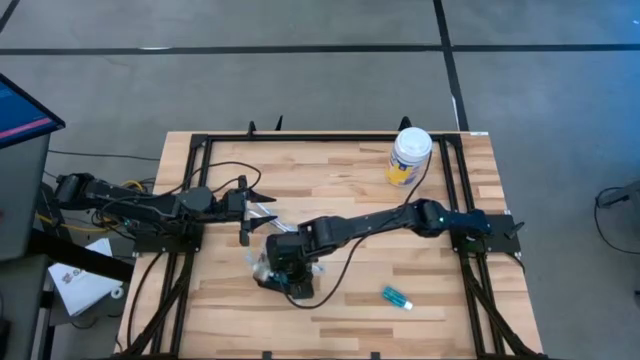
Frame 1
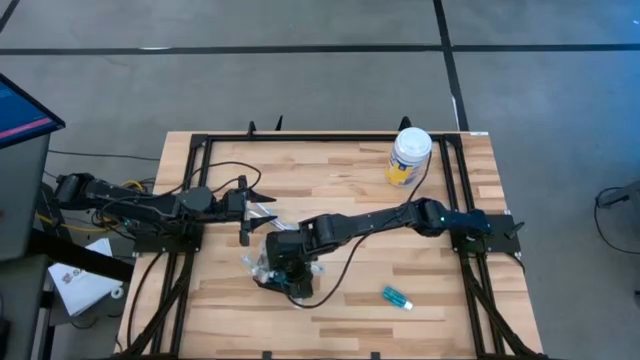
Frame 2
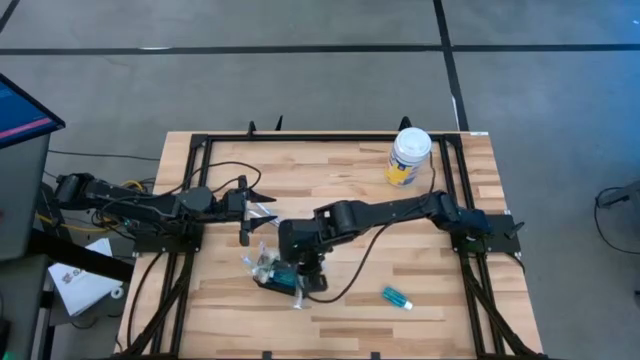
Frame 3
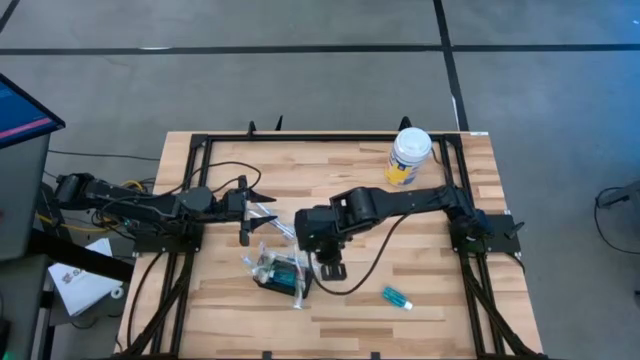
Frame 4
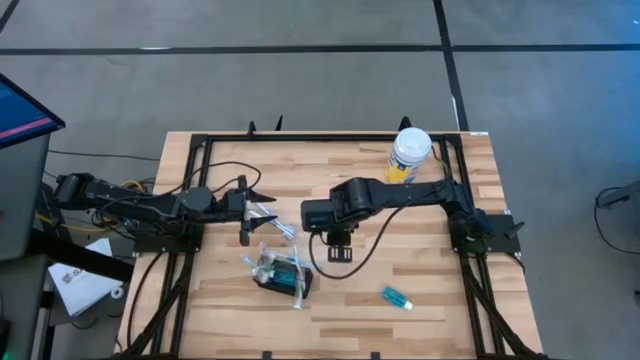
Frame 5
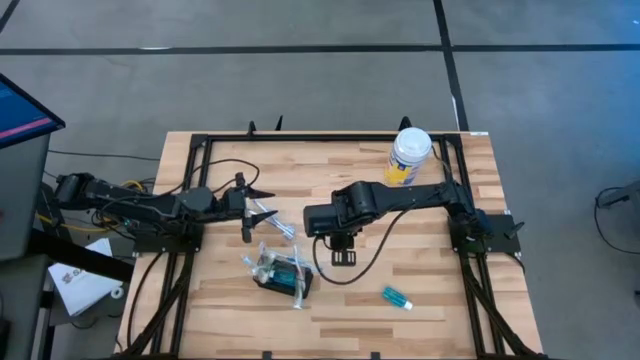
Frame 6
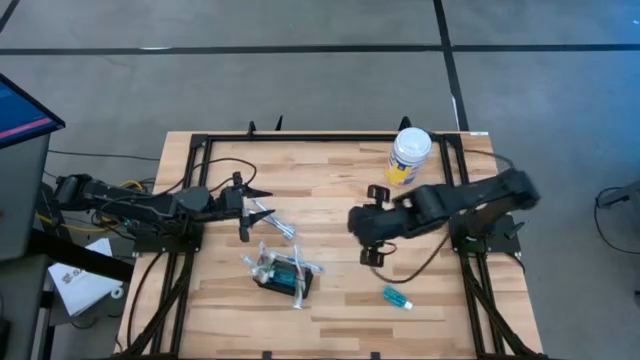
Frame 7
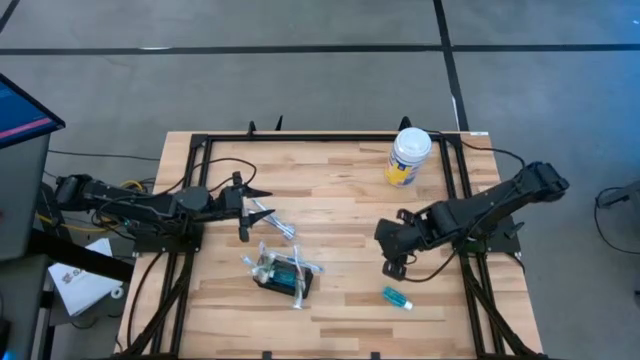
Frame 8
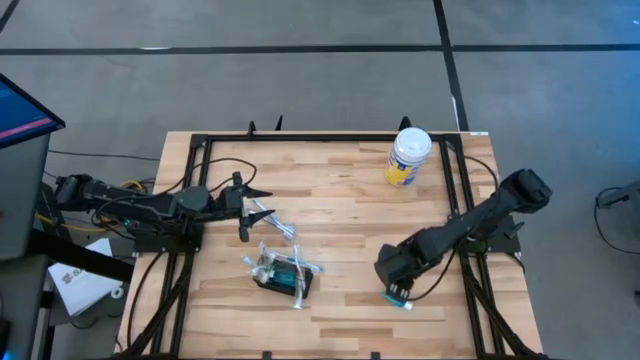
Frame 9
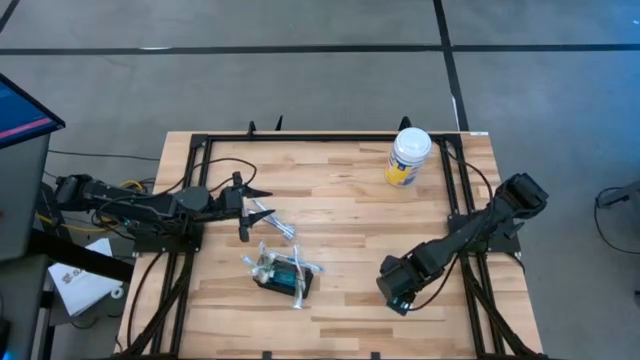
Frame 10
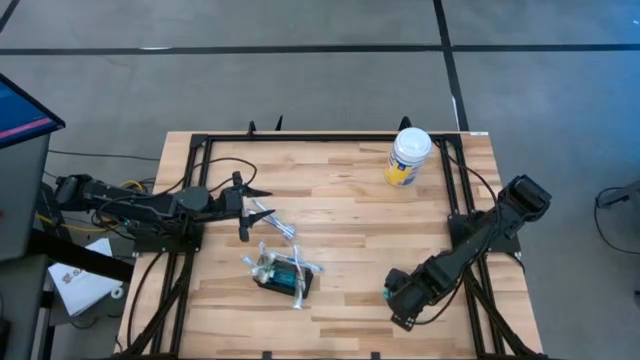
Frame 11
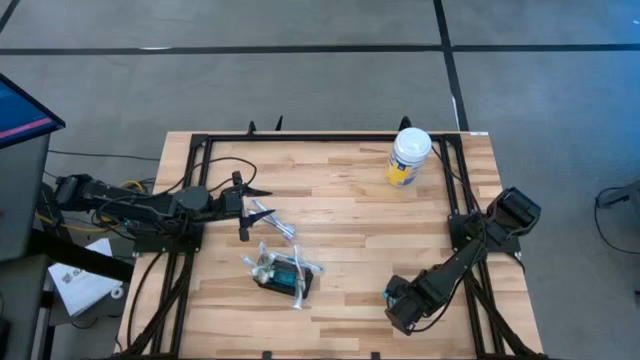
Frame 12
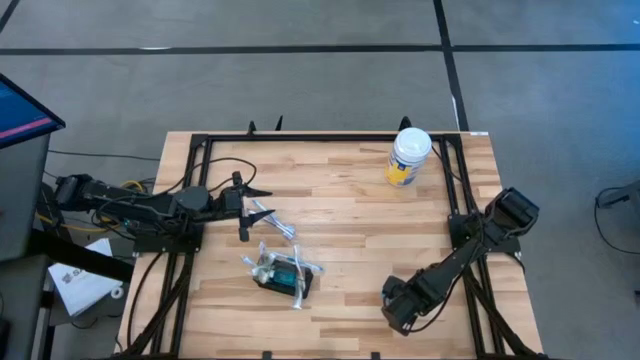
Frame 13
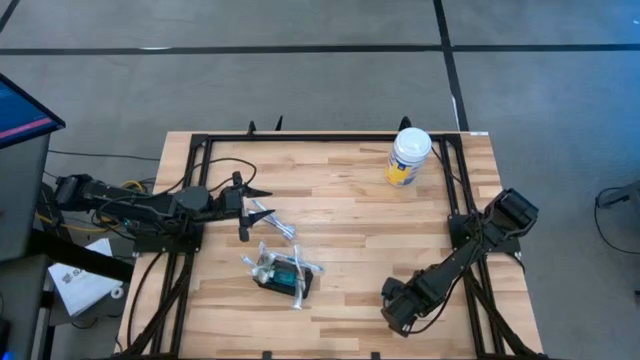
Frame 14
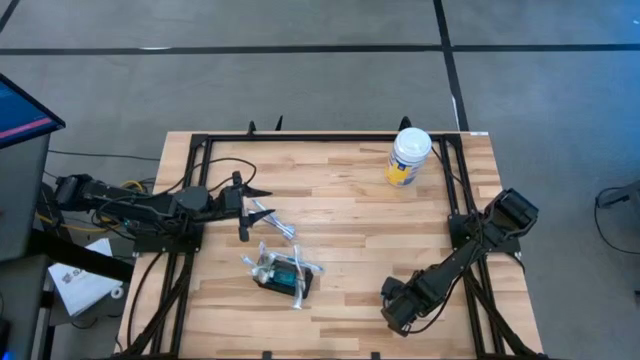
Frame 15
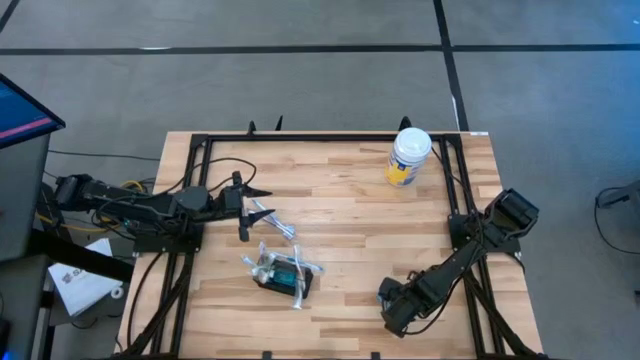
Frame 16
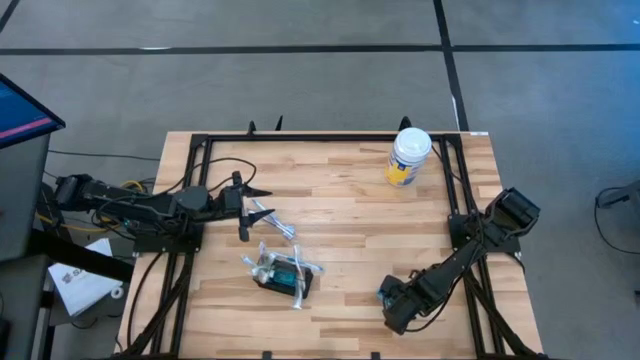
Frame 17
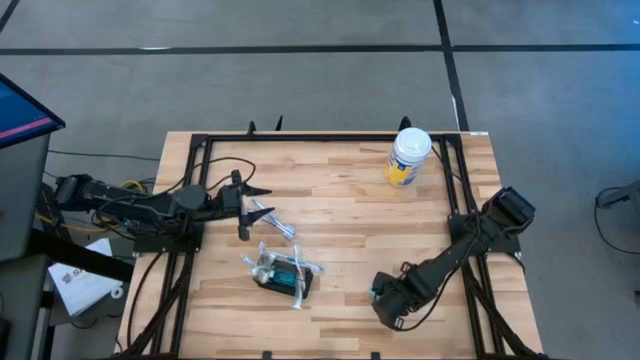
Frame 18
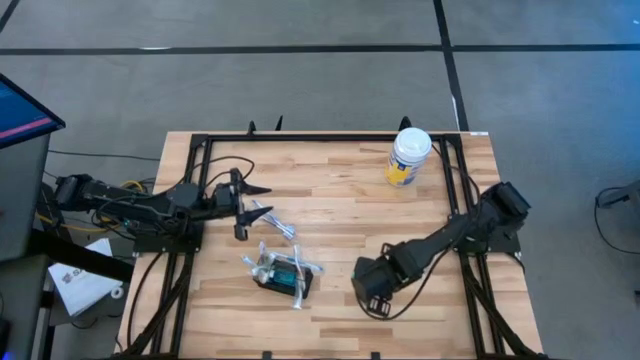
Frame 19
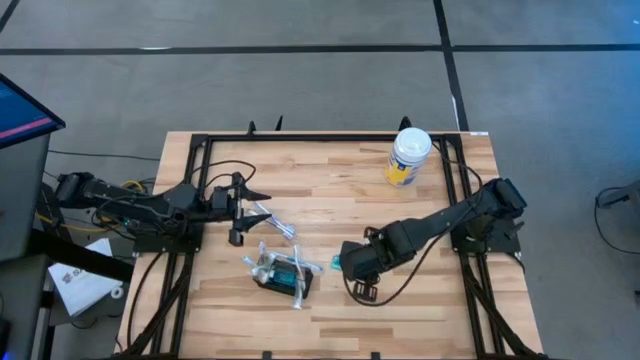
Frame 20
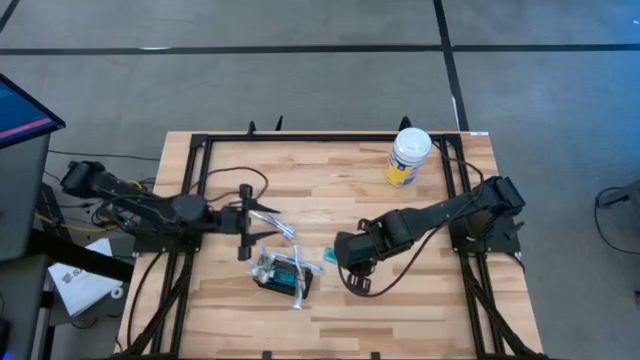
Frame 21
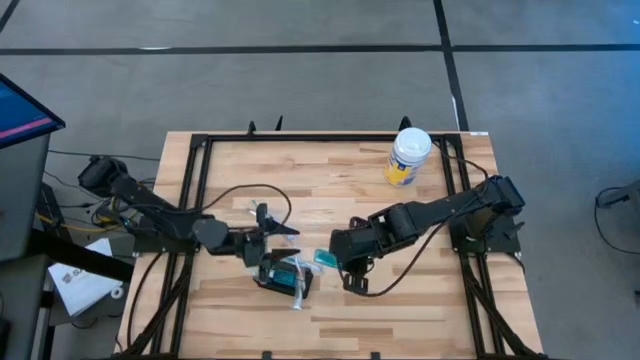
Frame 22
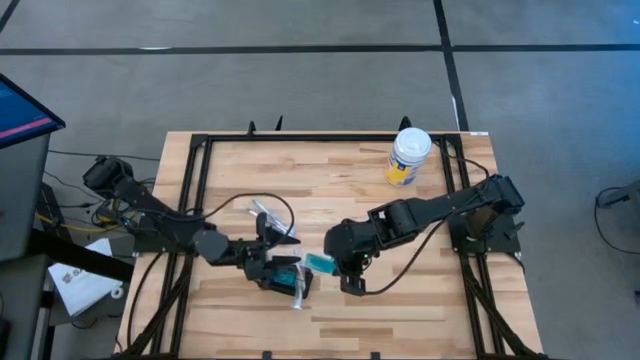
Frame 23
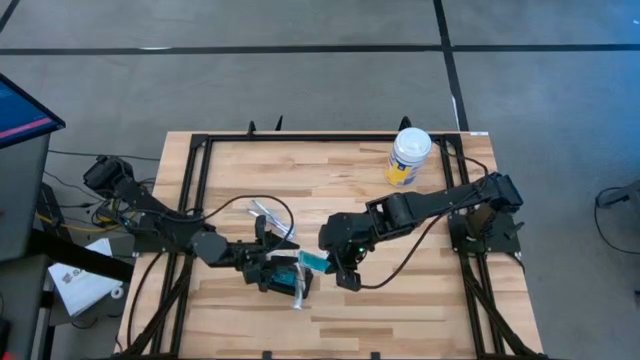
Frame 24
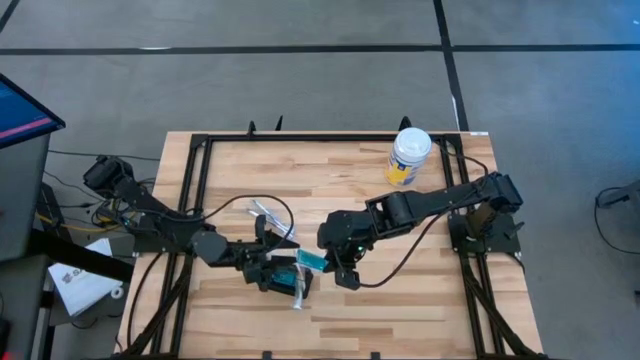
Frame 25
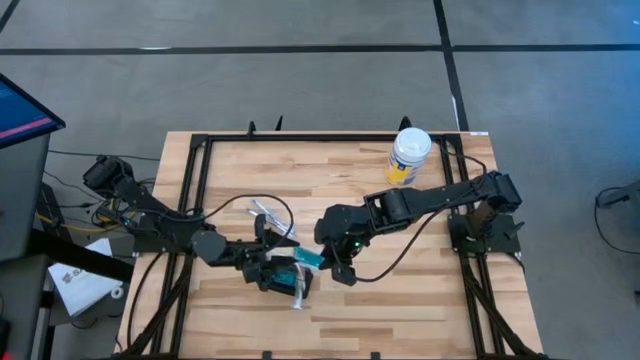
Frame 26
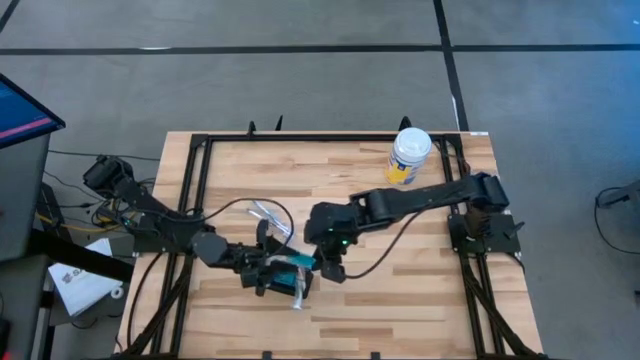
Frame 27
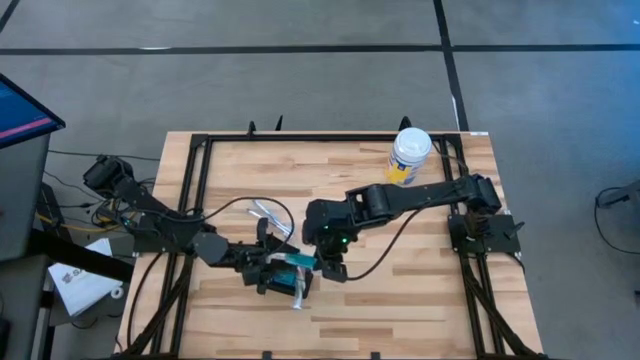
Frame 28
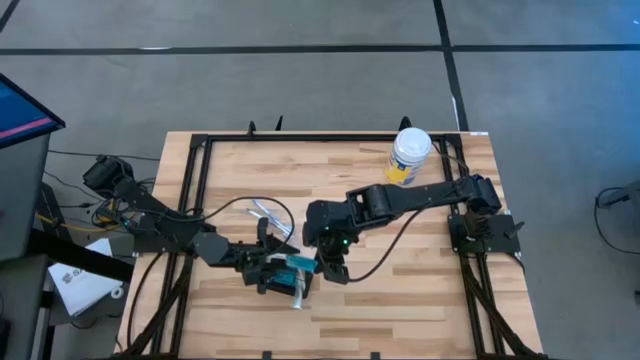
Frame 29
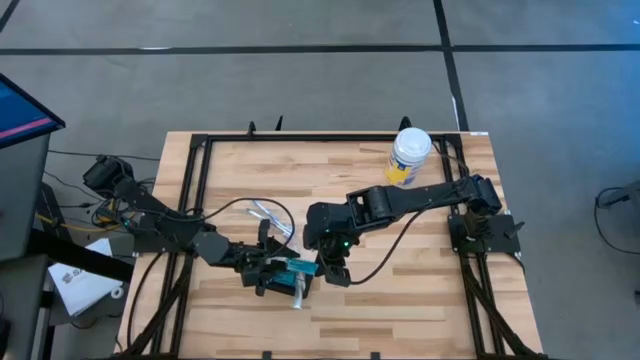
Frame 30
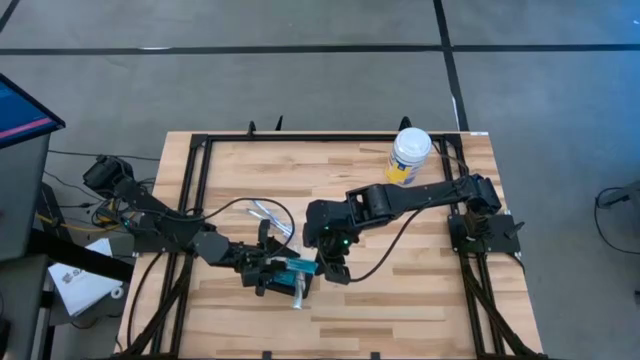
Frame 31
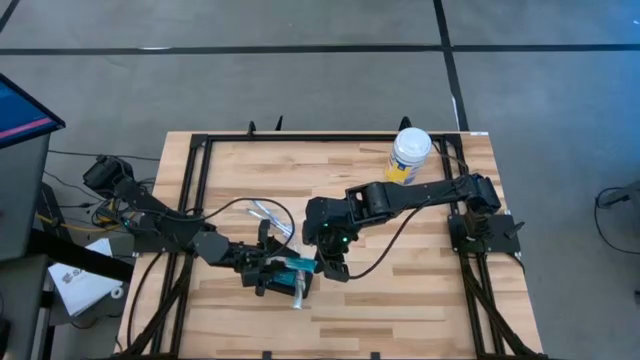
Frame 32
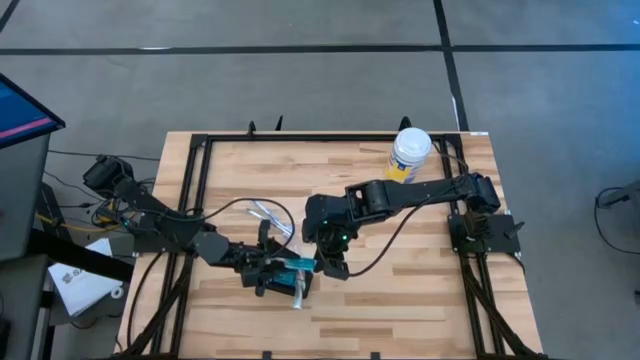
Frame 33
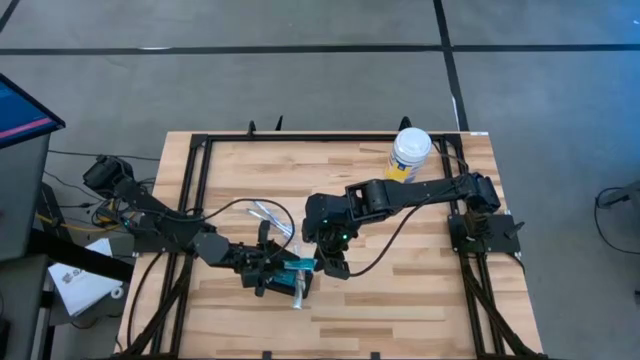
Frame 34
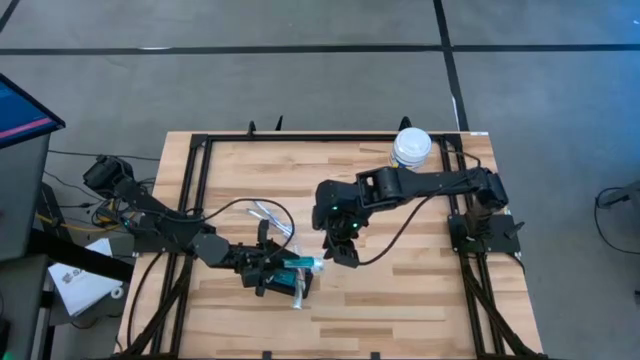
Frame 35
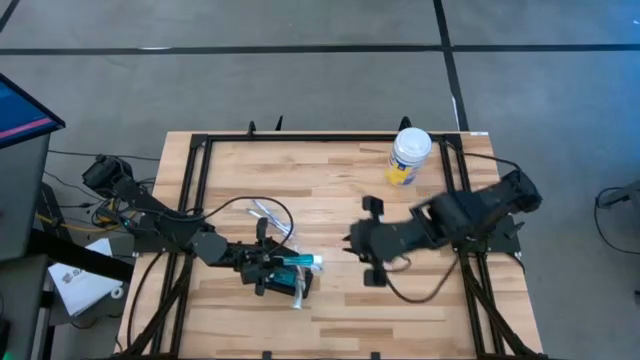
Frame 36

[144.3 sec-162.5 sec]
Task: Pick & Place toothbrushing station
Put the mouthwash into the mesh organizer
